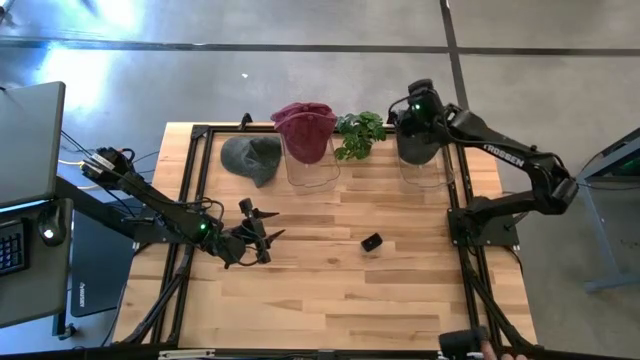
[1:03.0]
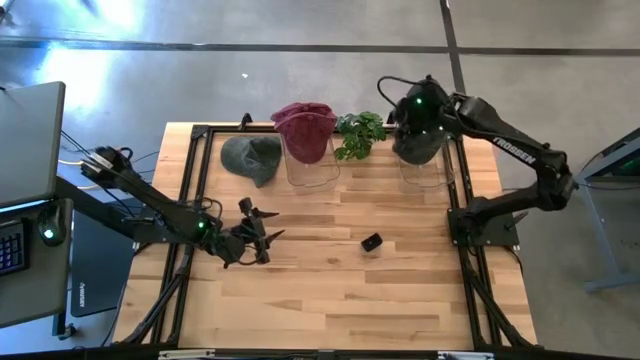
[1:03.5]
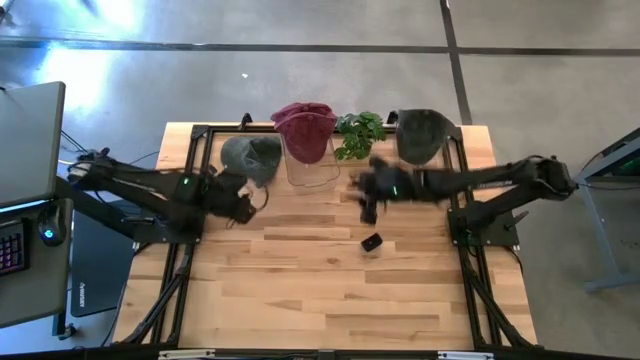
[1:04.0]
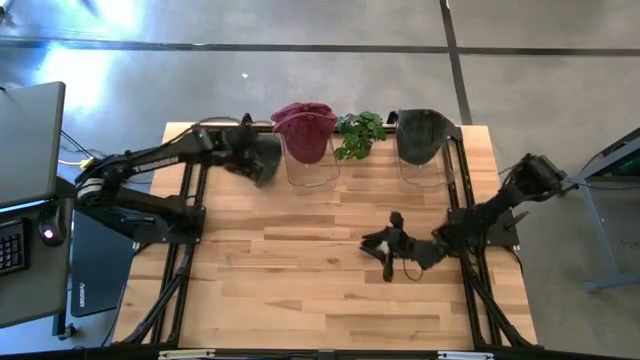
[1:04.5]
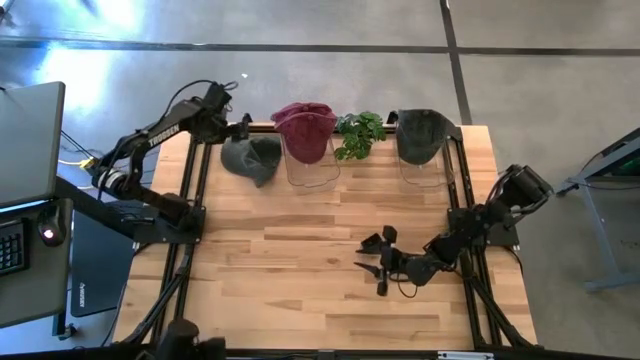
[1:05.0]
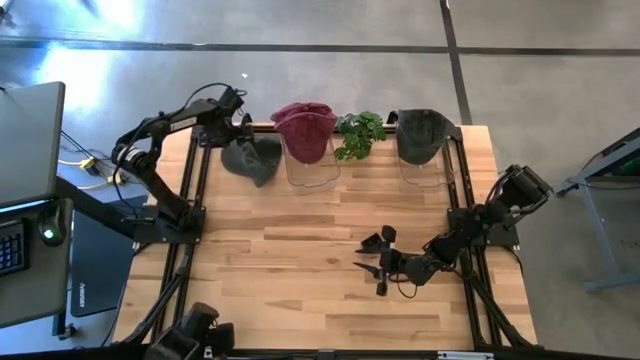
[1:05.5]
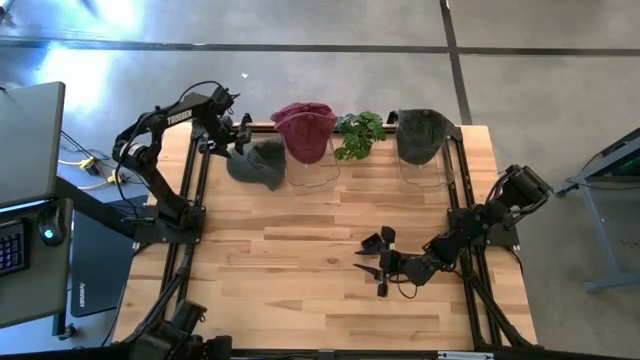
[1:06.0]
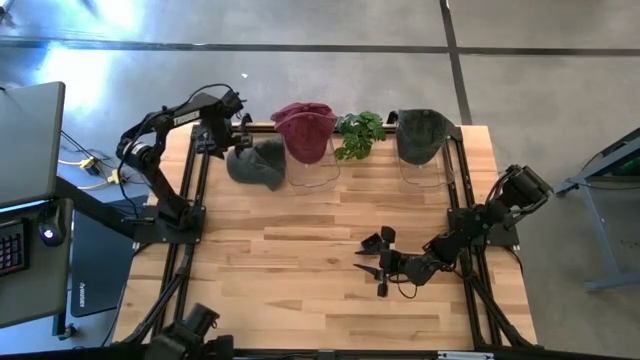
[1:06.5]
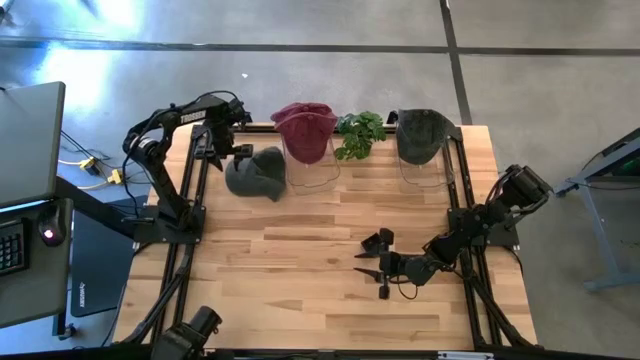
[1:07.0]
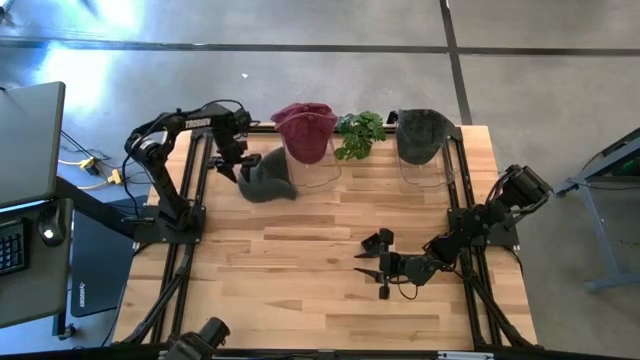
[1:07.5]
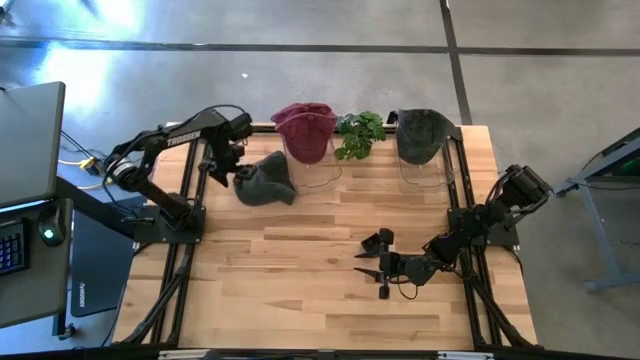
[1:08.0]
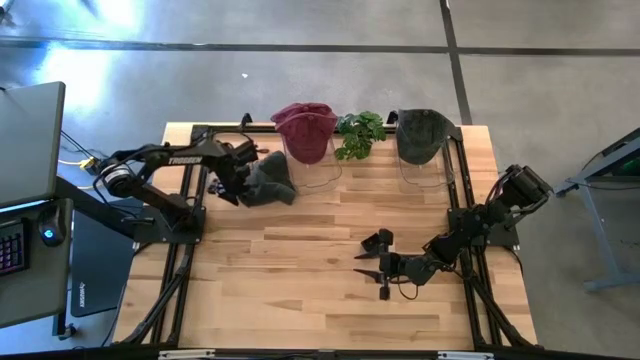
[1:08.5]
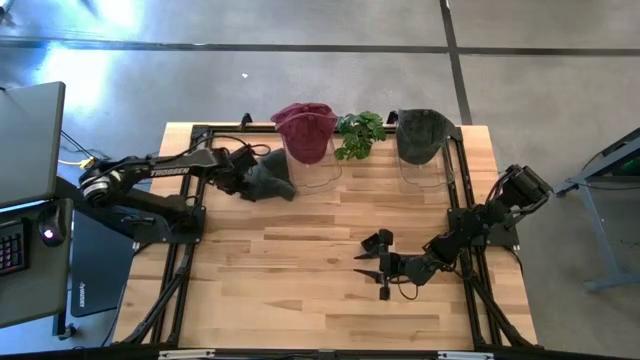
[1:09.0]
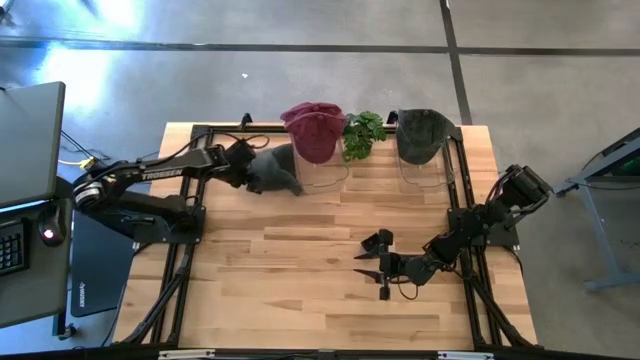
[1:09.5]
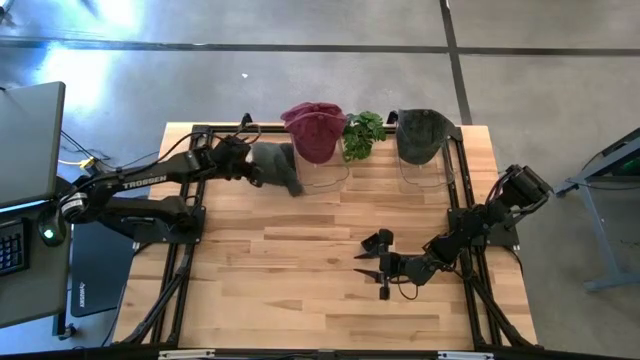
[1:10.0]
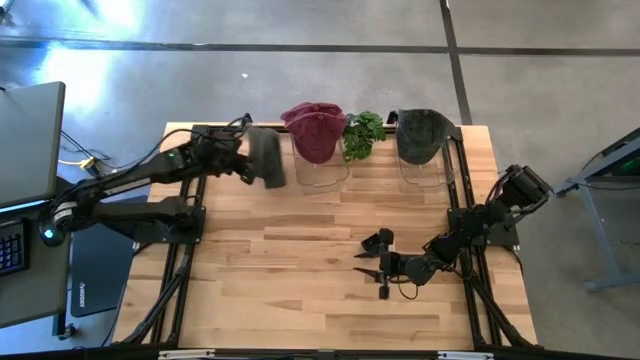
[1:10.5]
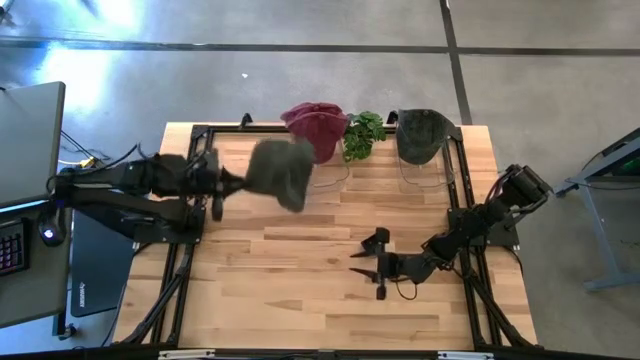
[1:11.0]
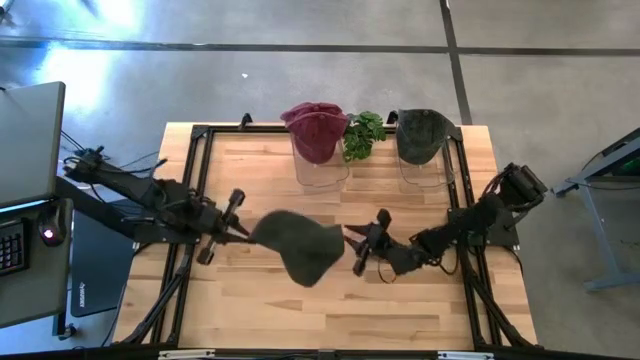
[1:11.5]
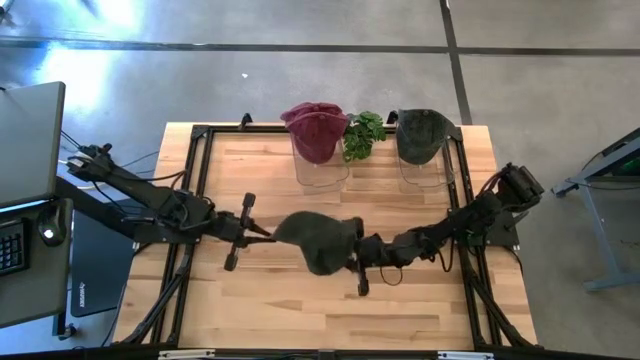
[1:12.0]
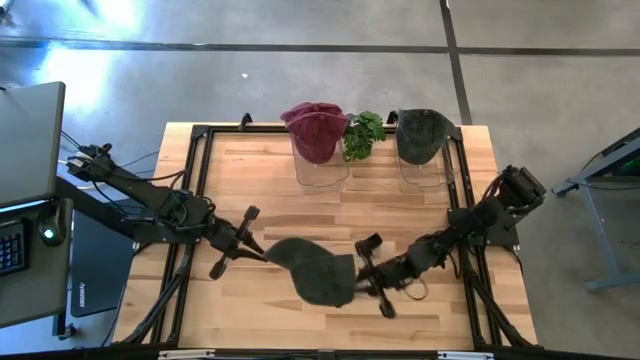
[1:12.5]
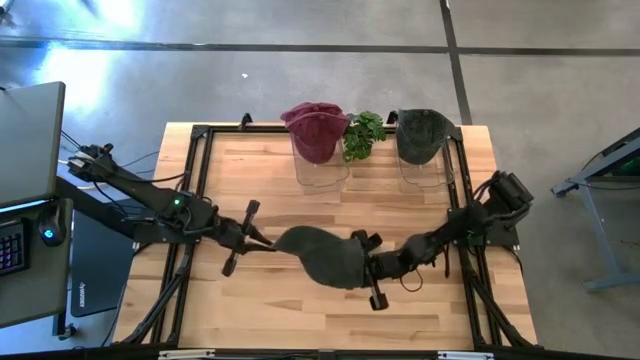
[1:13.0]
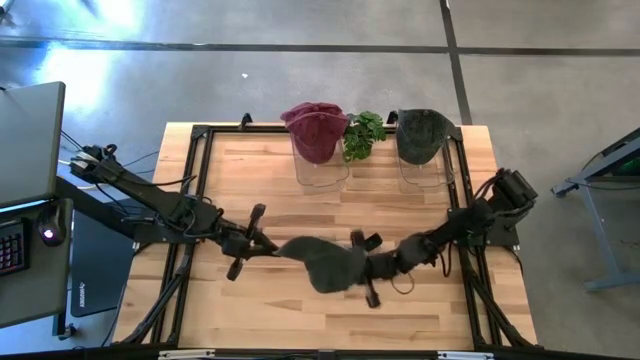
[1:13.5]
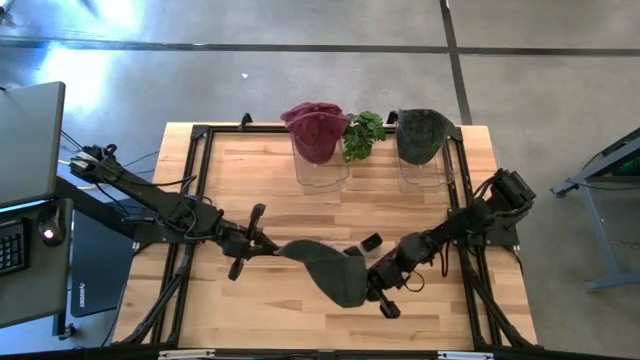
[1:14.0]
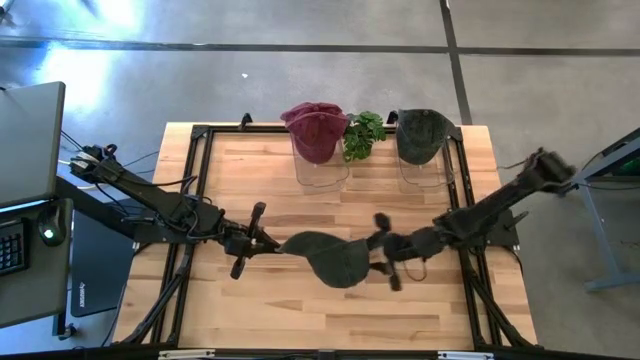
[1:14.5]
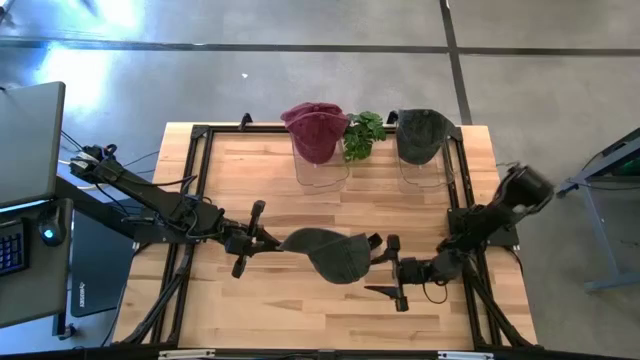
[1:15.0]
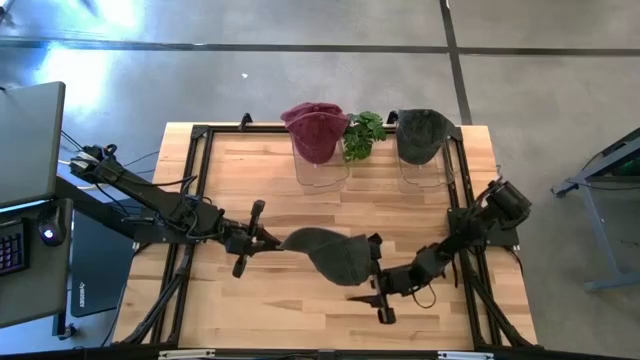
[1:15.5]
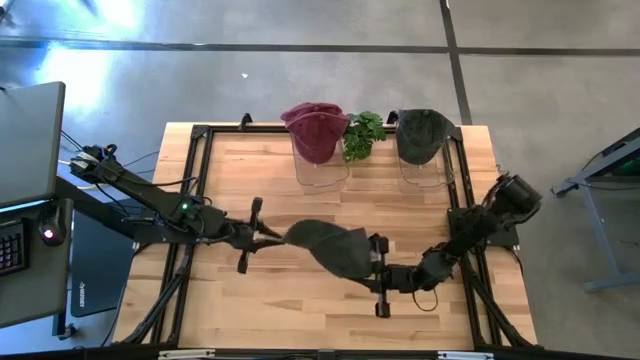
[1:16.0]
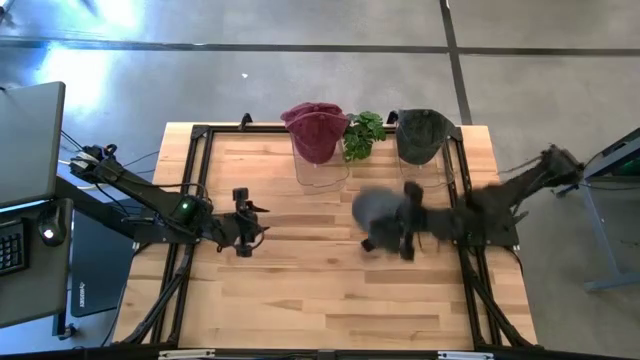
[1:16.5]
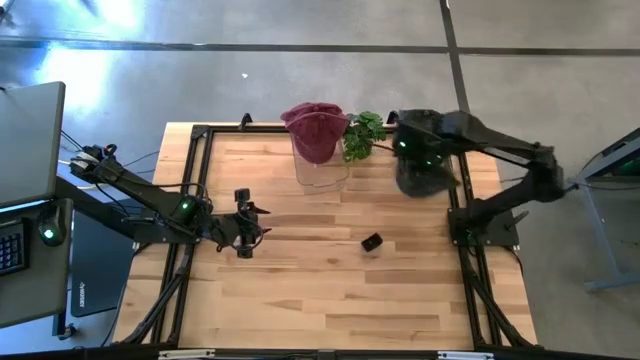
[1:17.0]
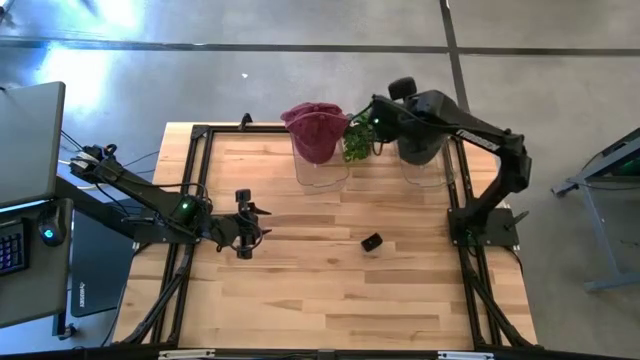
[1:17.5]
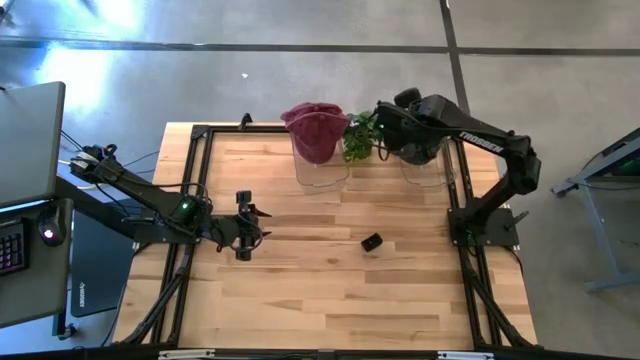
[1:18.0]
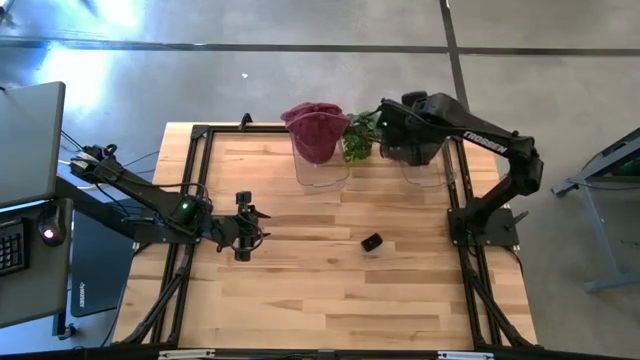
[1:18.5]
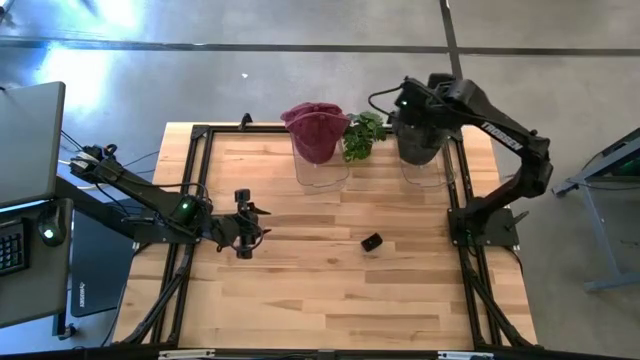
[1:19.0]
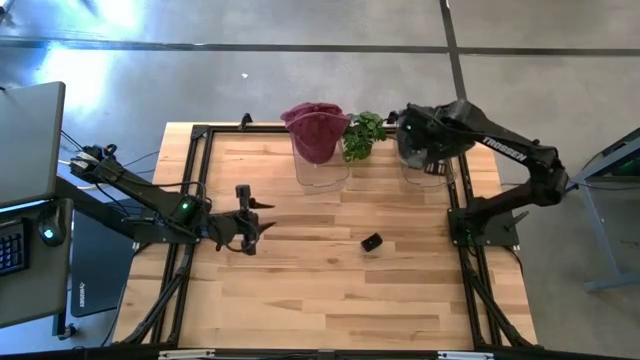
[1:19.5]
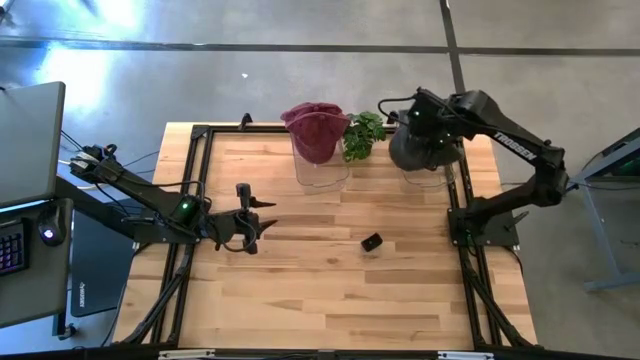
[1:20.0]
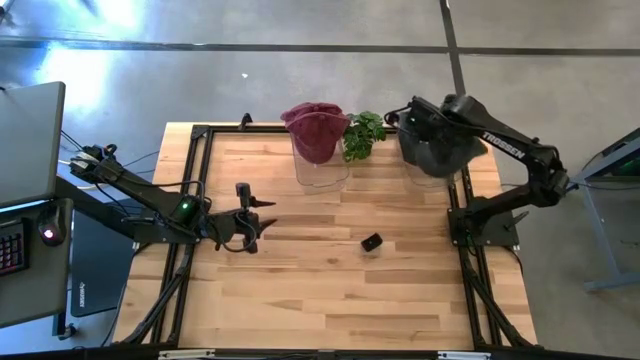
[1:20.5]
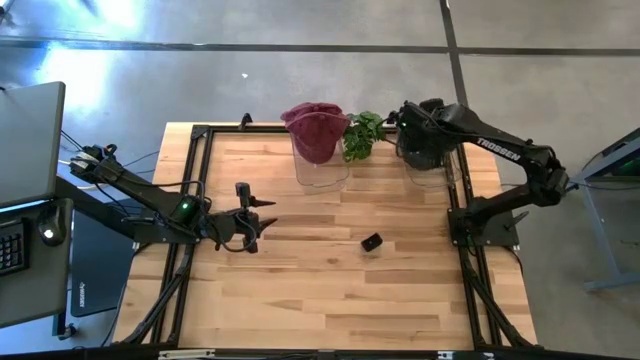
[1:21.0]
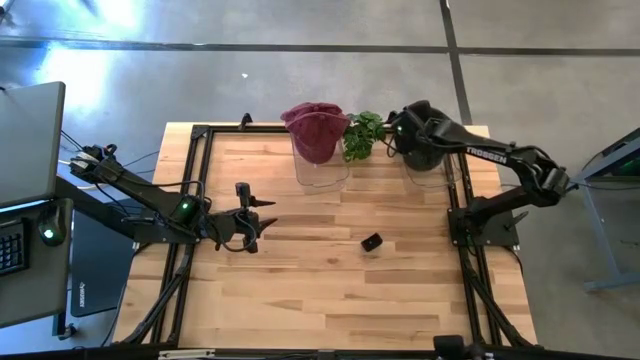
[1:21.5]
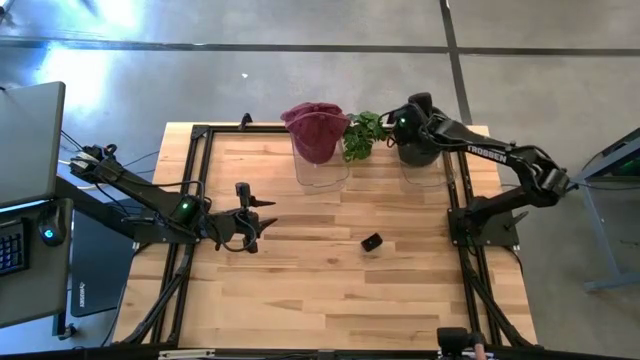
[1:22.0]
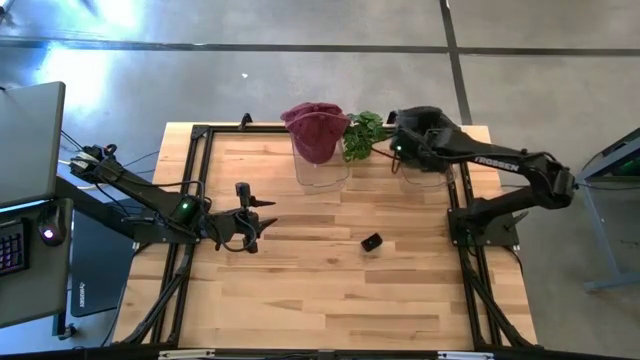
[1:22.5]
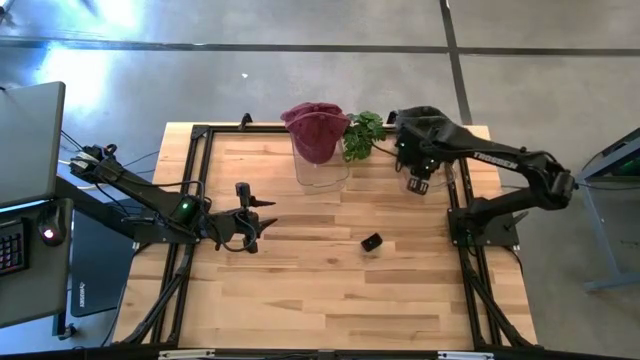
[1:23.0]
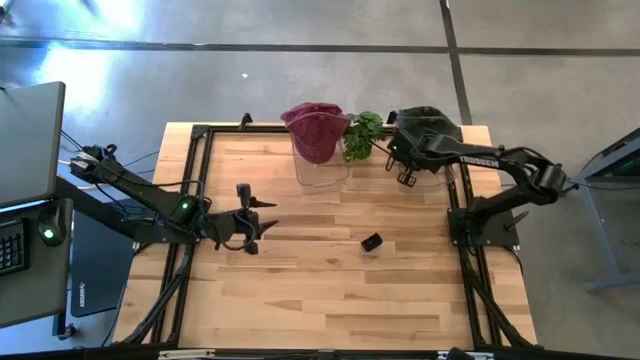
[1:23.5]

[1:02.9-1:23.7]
Task: Pick & Place hat
Put the black cap into the right transparent bin

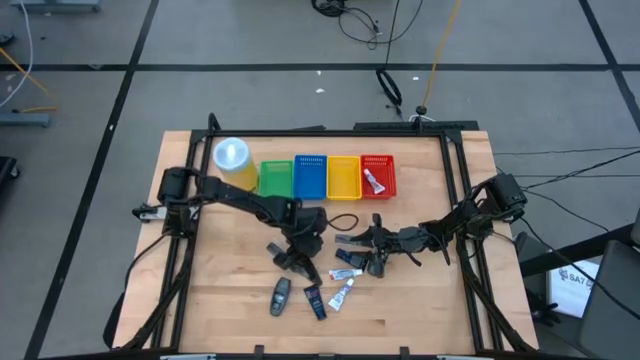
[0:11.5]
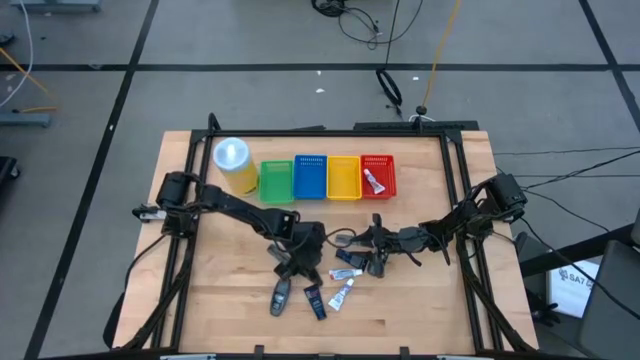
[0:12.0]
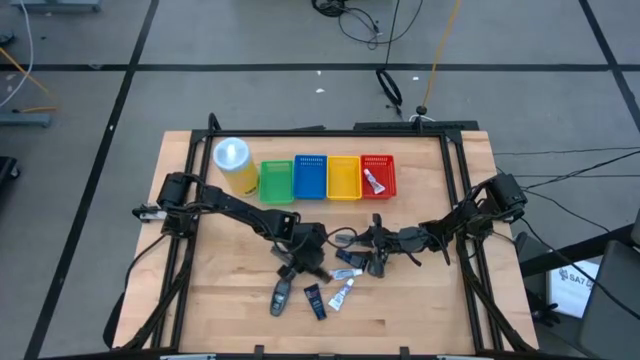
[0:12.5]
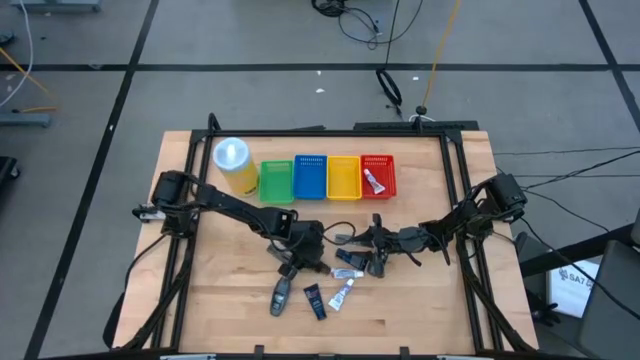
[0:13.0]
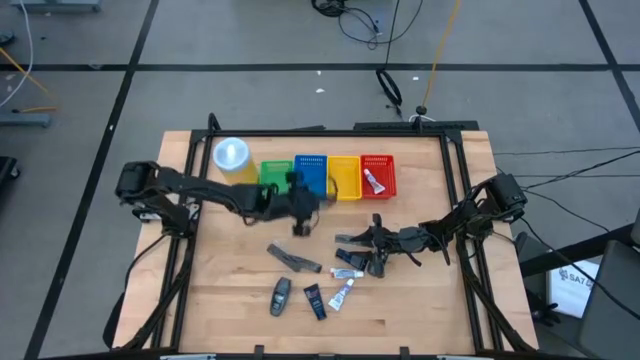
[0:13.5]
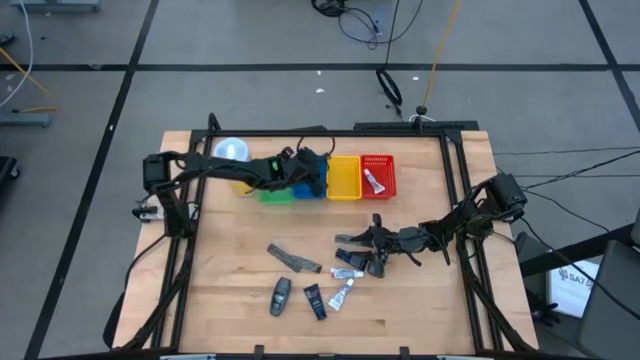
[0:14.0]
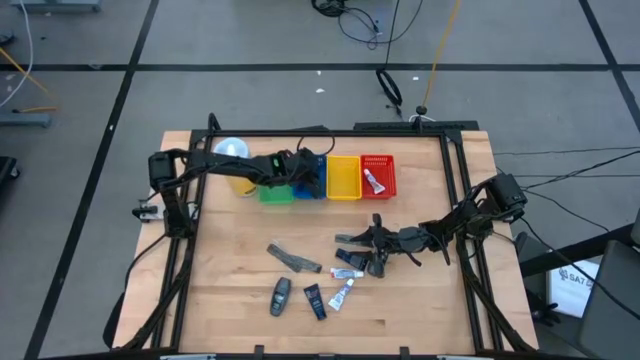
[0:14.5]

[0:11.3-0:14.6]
Task: Pick & Place Travel size toiletries
Put the hair comb into the blue bin
